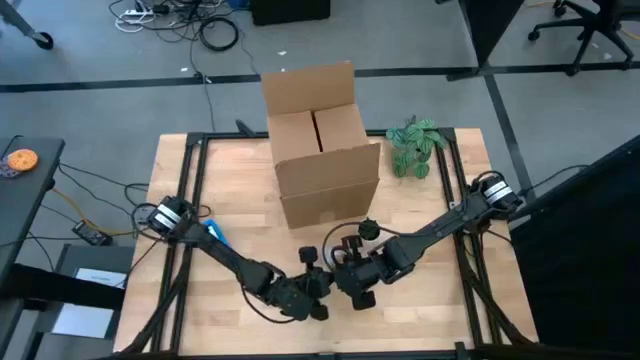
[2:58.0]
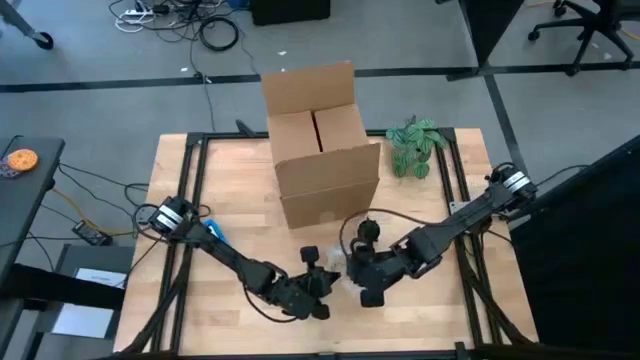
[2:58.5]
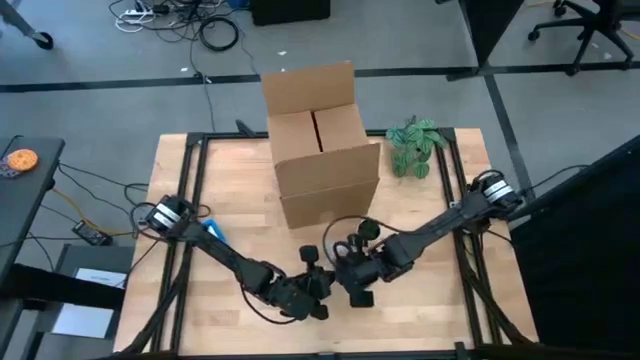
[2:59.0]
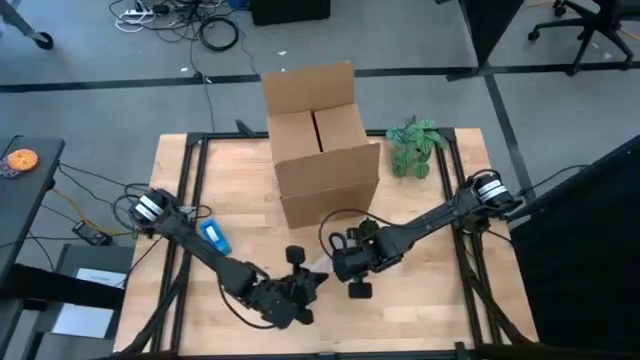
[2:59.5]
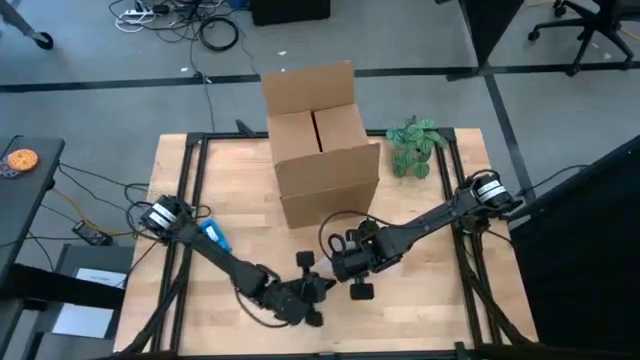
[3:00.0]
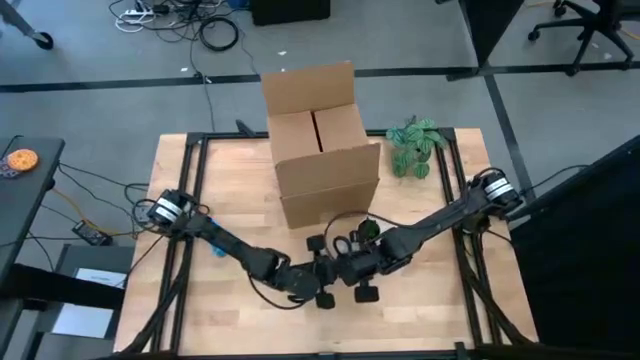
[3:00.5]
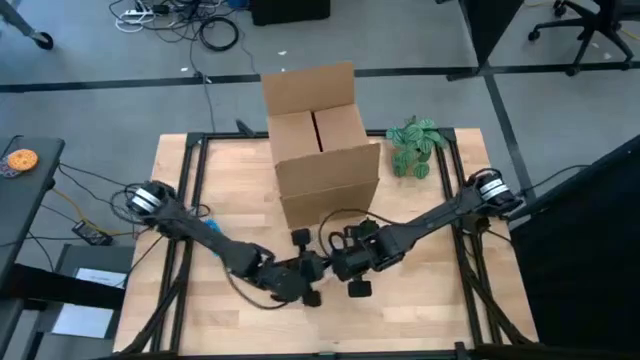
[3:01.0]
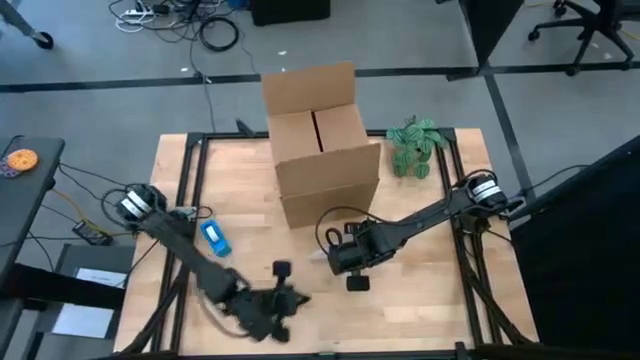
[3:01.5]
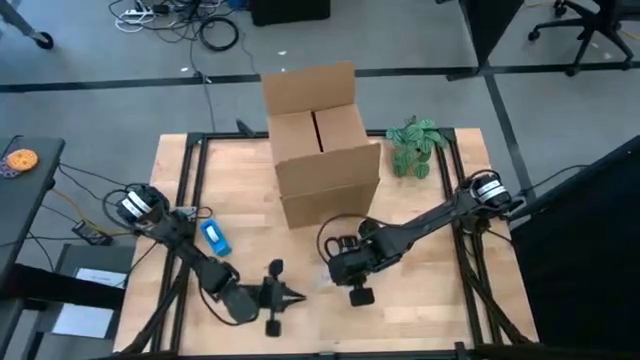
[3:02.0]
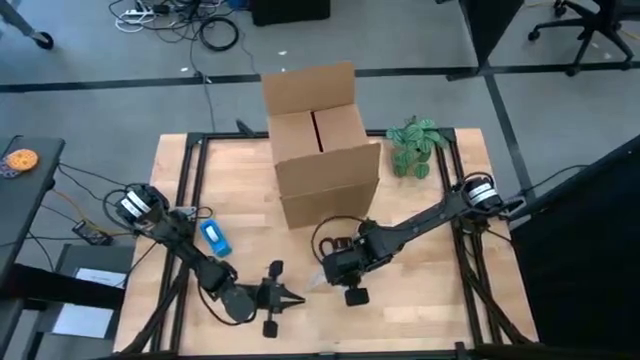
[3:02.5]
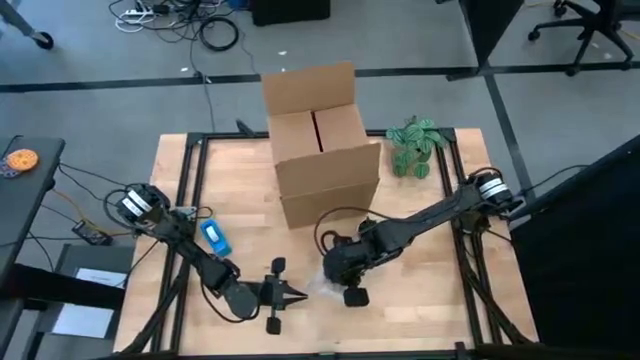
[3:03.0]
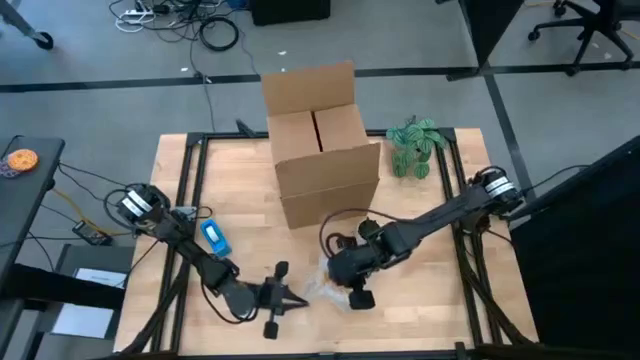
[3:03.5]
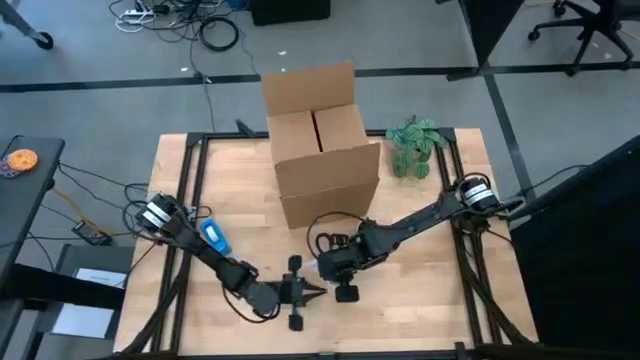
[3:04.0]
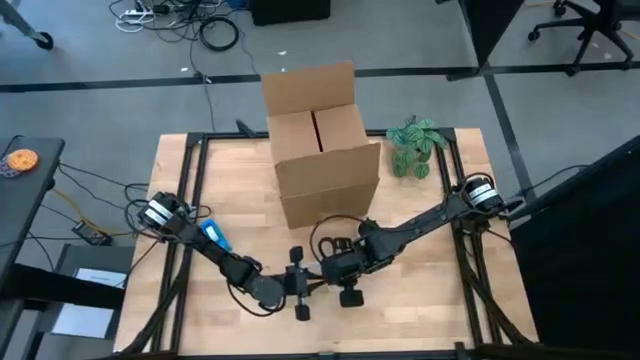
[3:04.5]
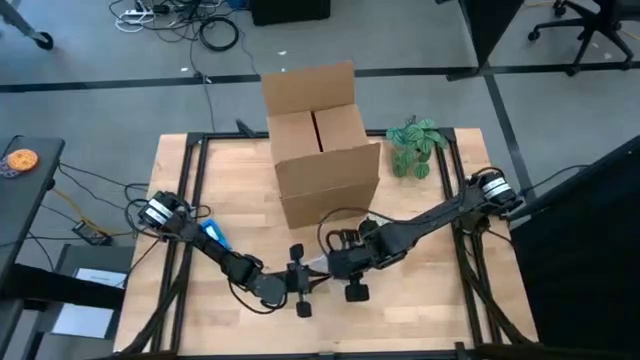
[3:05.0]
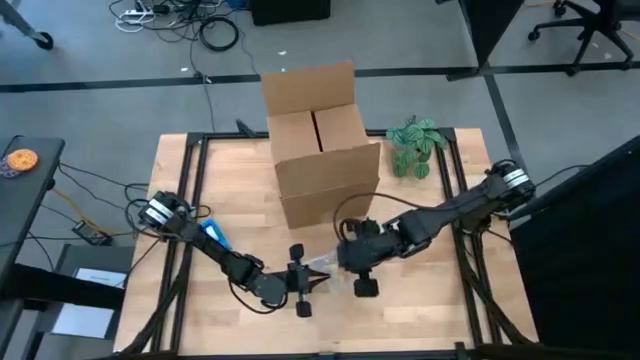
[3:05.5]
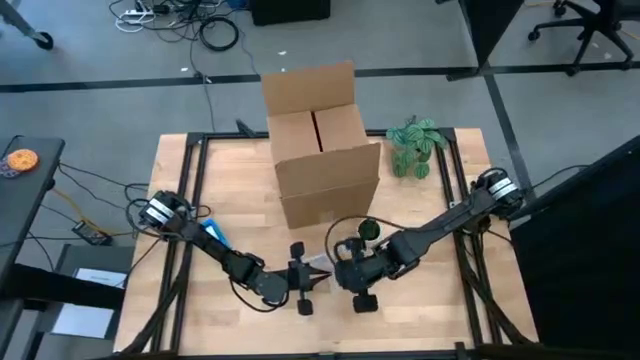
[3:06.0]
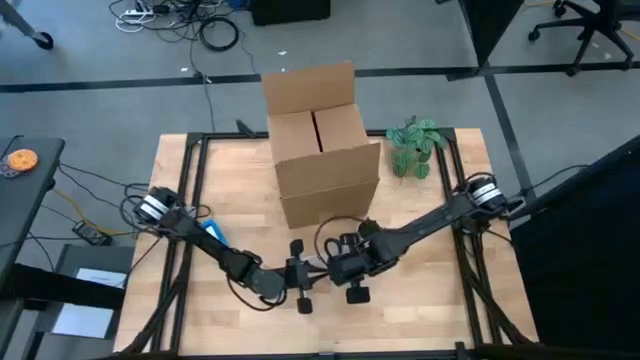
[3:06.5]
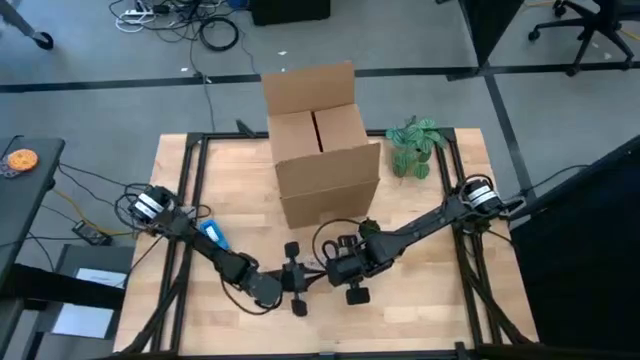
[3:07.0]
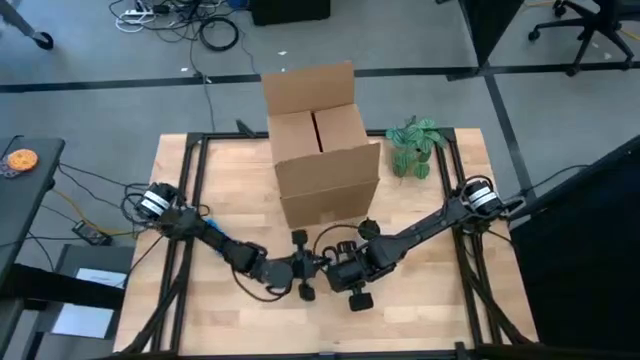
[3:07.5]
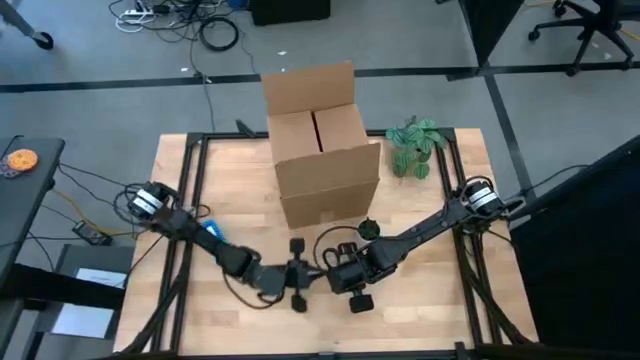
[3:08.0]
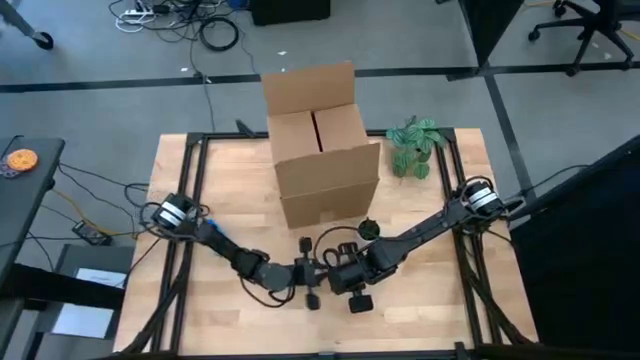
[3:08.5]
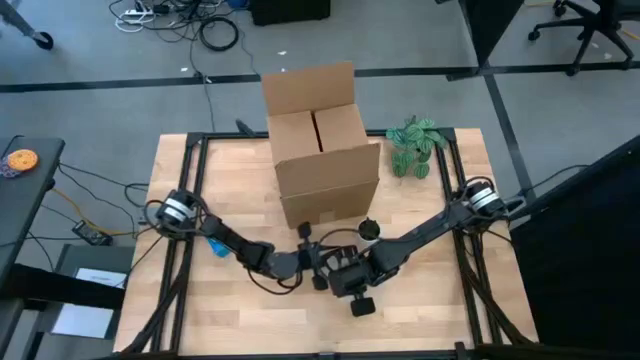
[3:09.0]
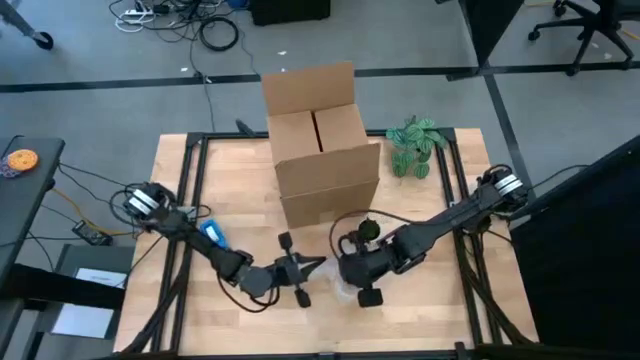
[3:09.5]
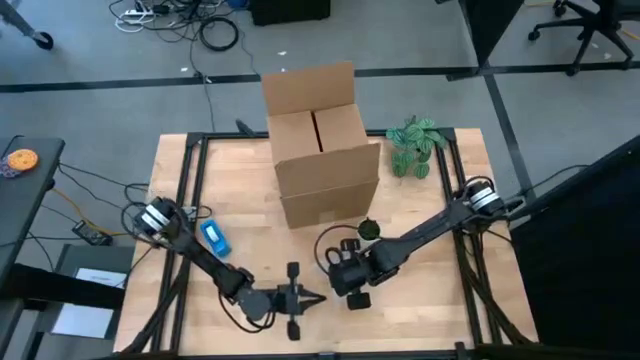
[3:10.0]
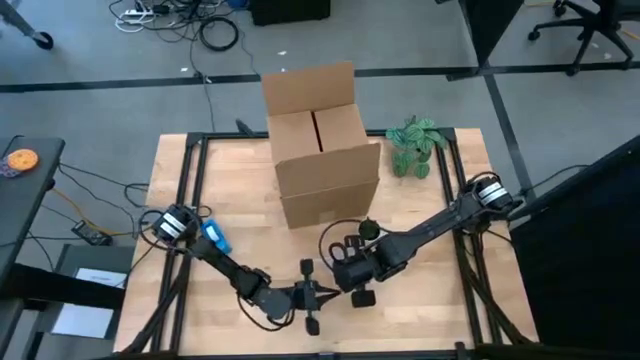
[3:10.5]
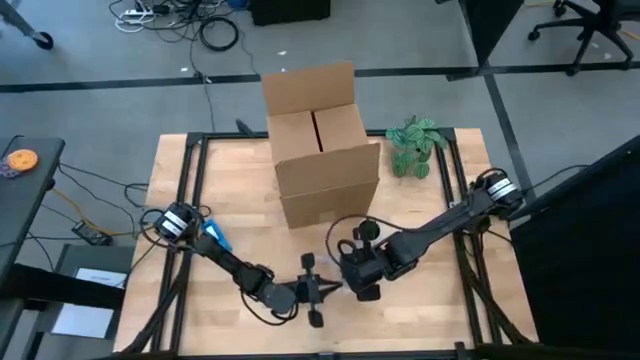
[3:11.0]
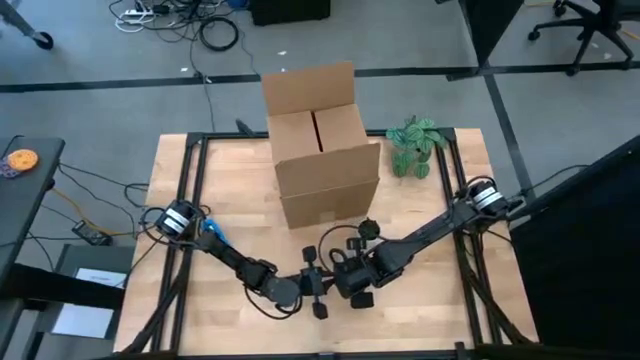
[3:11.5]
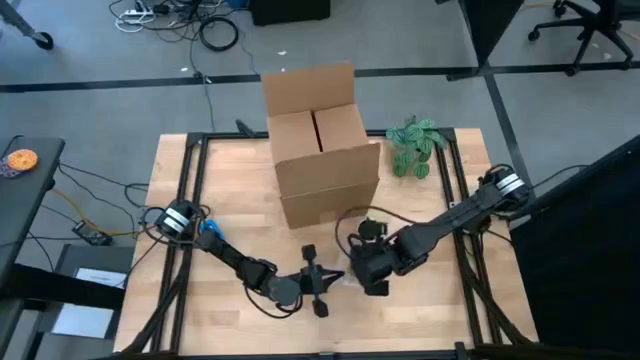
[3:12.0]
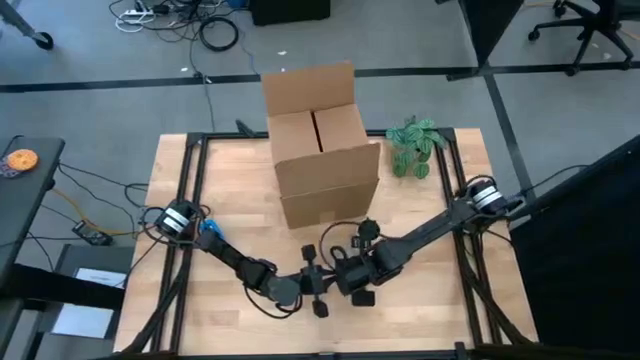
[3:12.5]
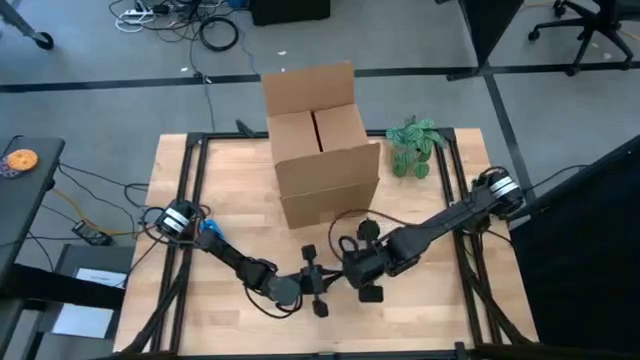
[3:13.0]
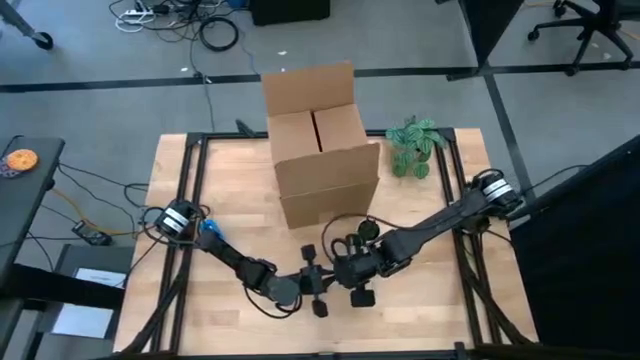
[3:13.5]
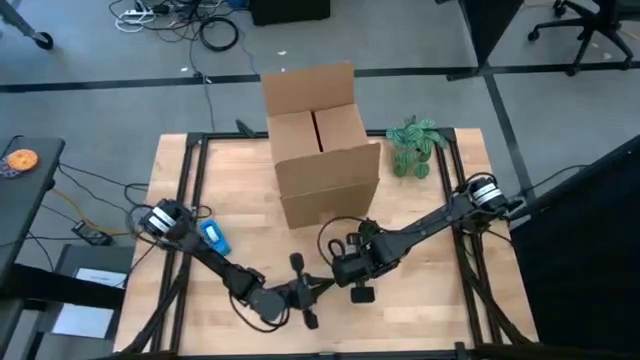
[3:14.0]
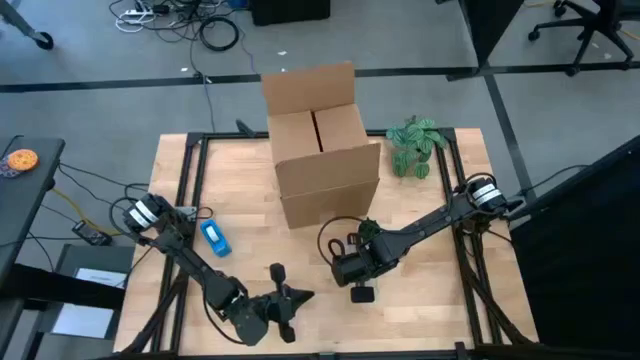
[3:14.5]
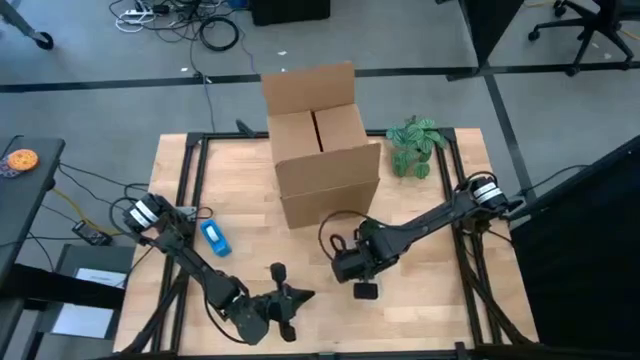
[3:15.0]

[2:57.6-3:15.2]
Task: wrap mug
Wrap the yellow mug with the transparent bubble wrap

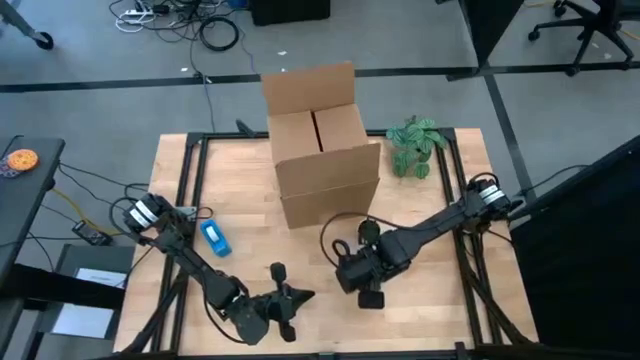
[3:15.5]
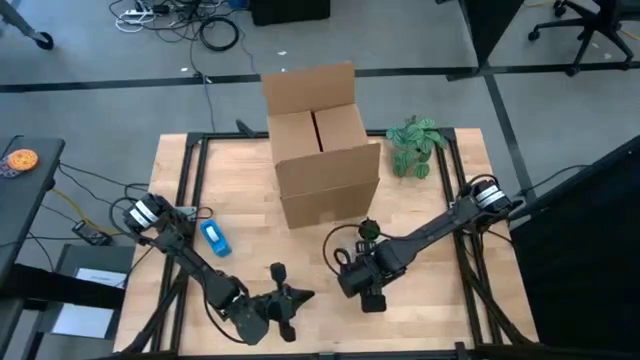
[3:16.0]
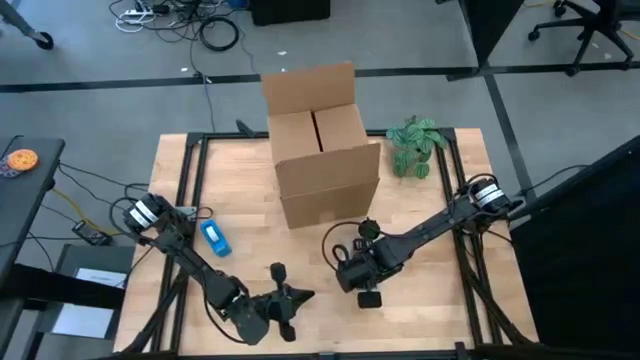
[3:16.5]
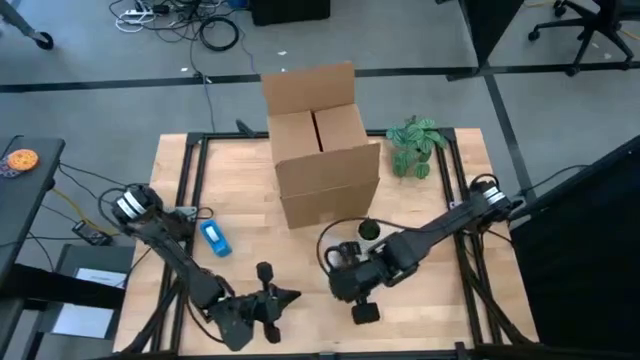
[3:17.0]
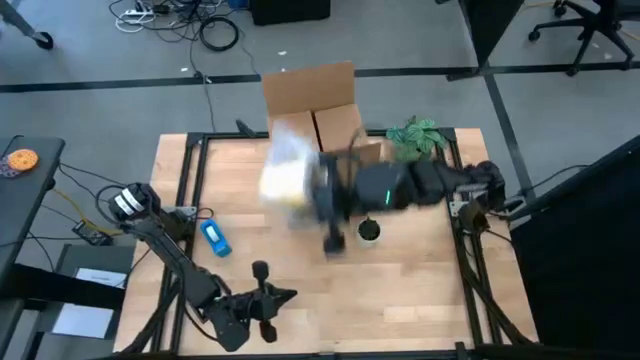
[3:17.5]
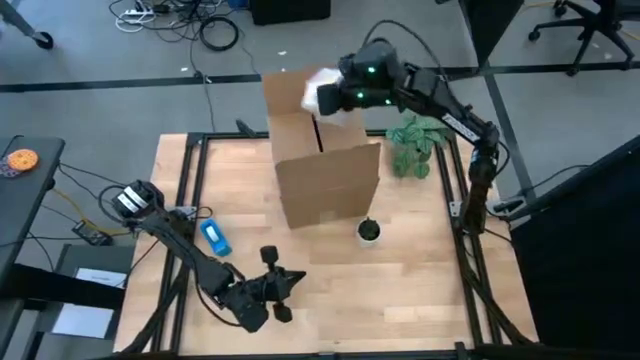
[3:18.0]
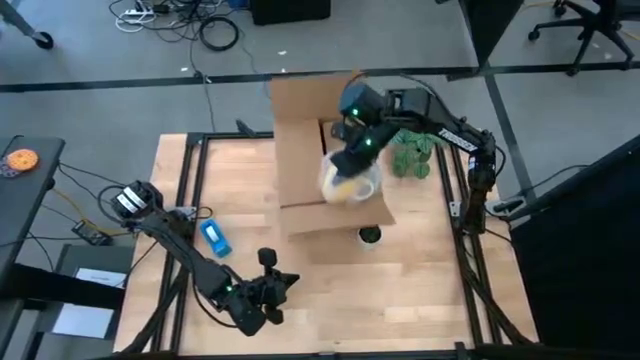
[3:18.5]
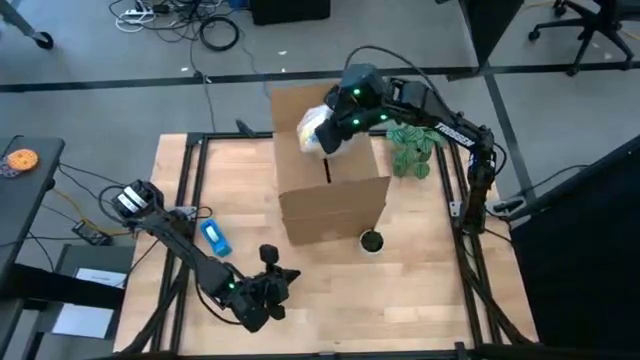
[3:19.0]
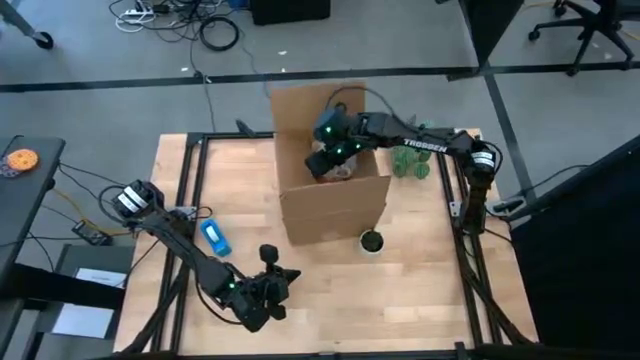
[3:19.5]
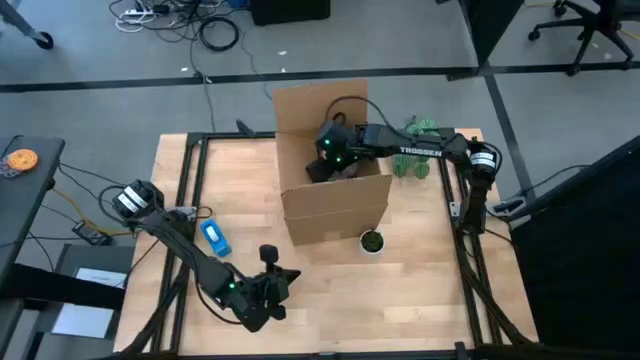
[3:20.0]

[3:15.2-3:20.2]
Put the wrapped yellow mug into the brown box
